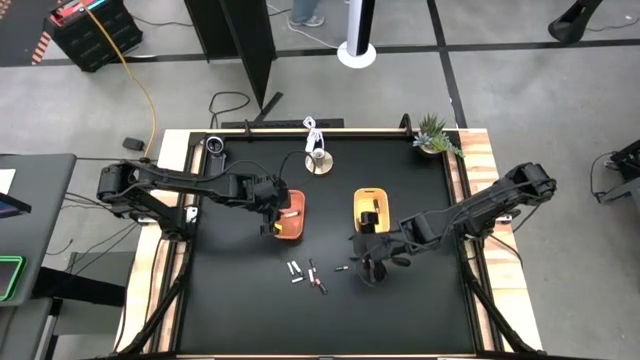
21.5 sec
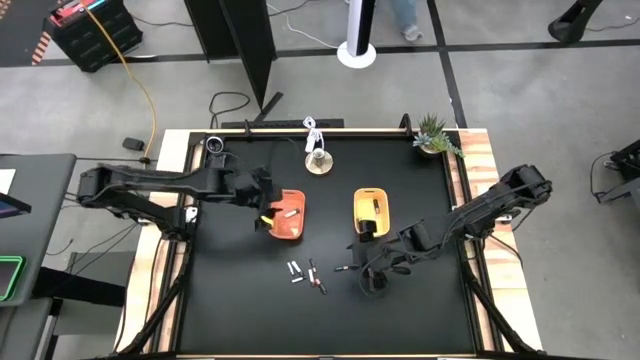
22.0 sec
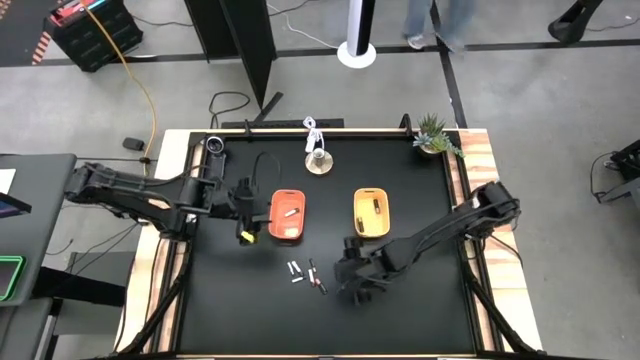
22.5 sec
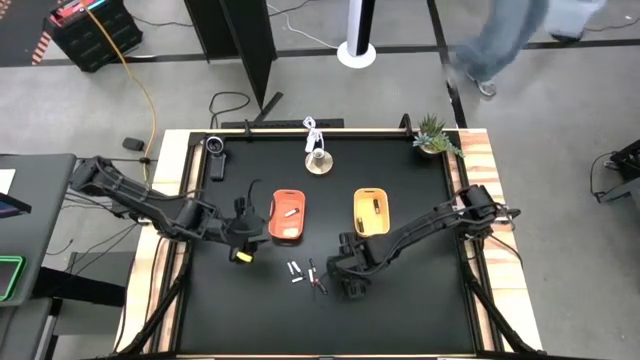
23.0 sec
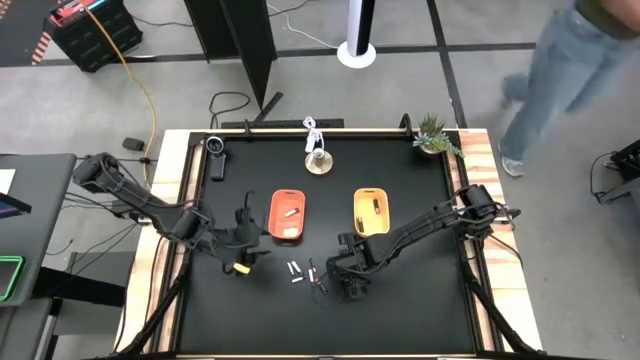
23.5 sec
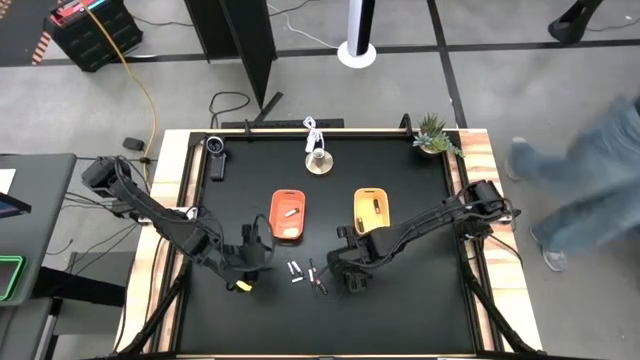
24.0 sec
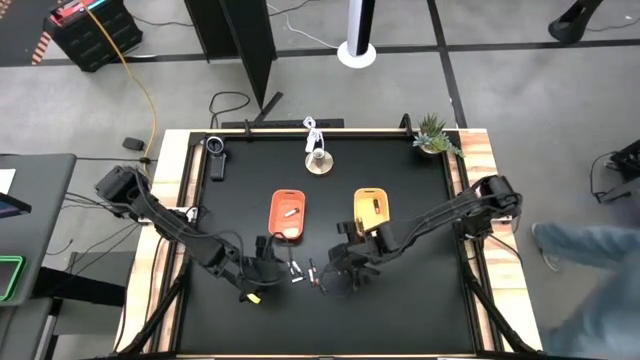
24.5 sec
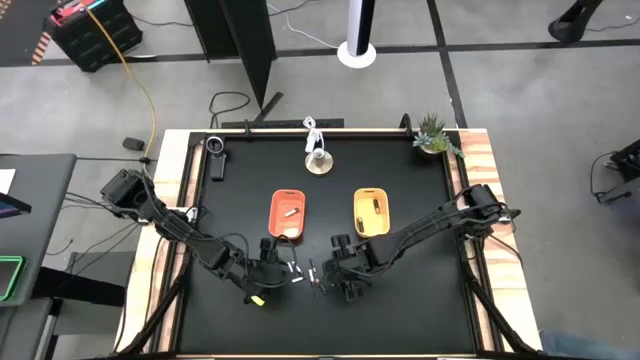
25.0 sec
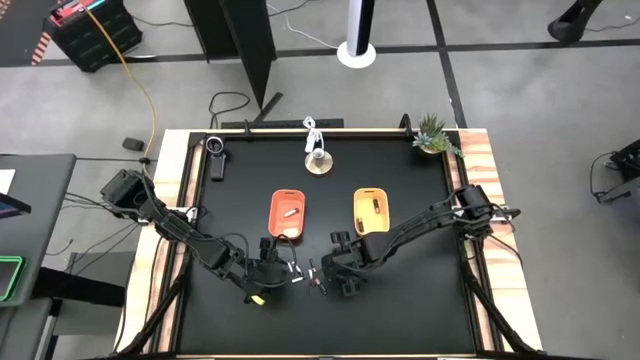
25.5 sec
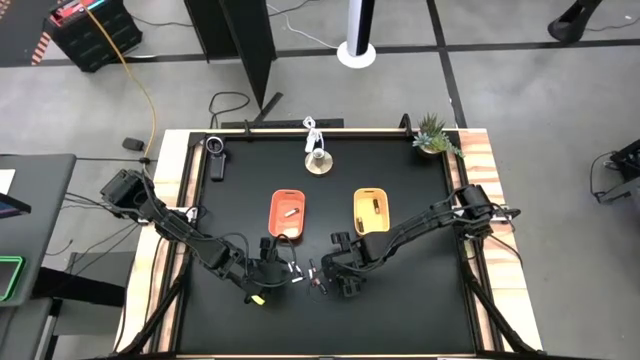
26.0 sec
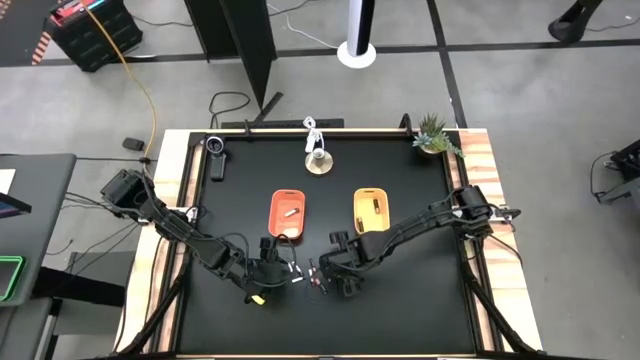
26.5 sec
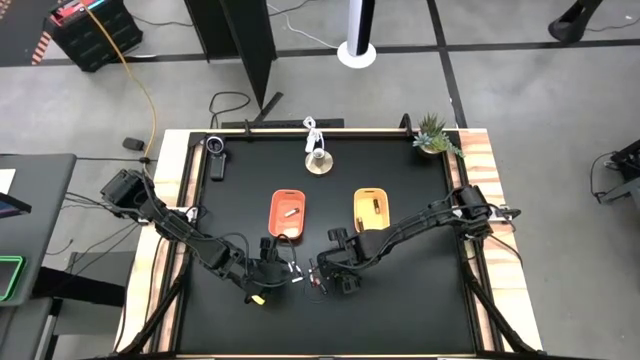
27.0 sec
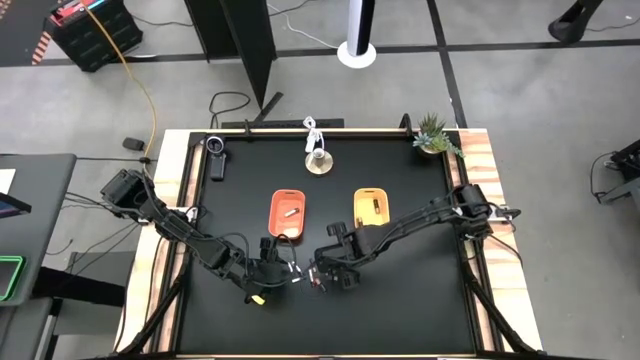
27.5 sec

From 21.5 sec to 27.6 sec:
Task: Sort batteries
Put the black battery into the yellow bin

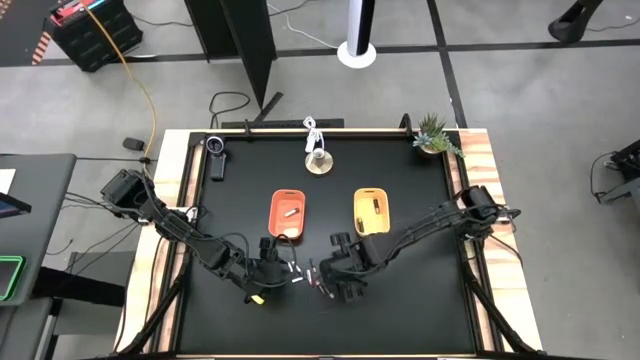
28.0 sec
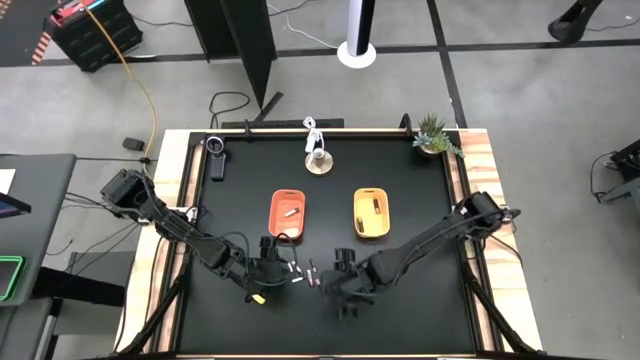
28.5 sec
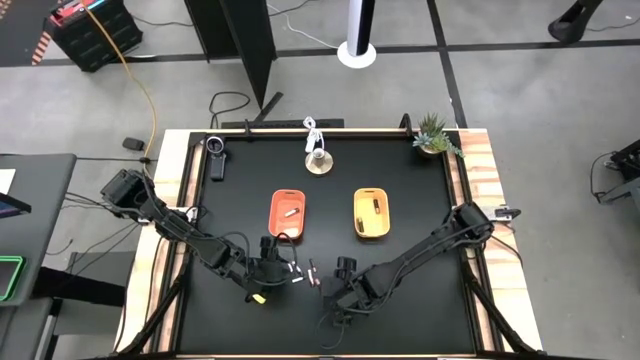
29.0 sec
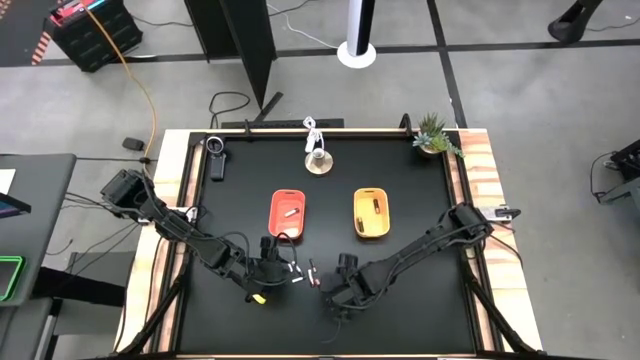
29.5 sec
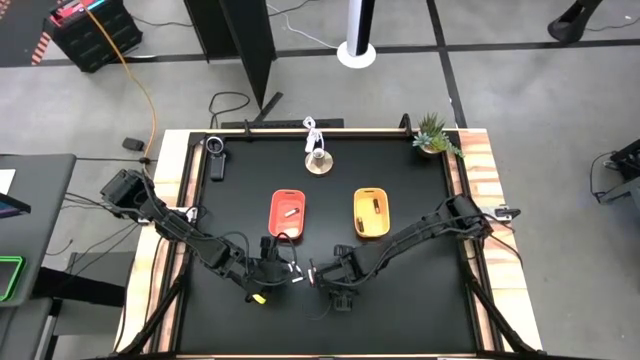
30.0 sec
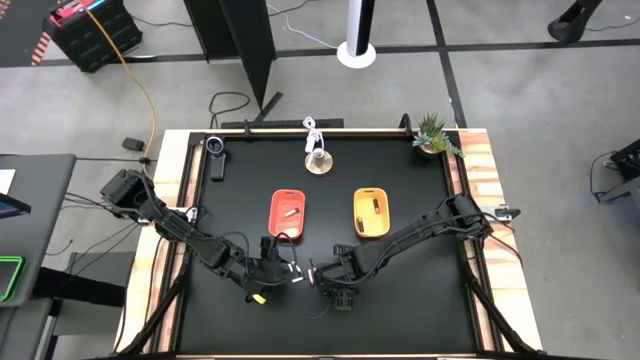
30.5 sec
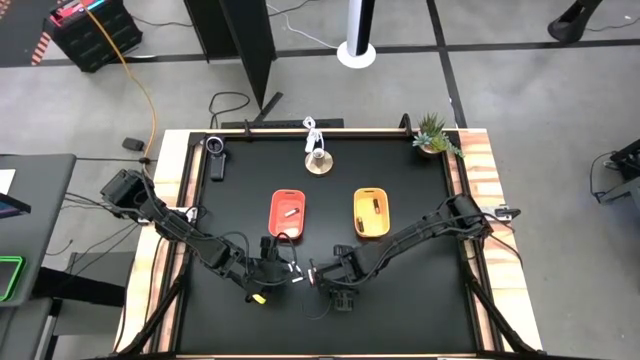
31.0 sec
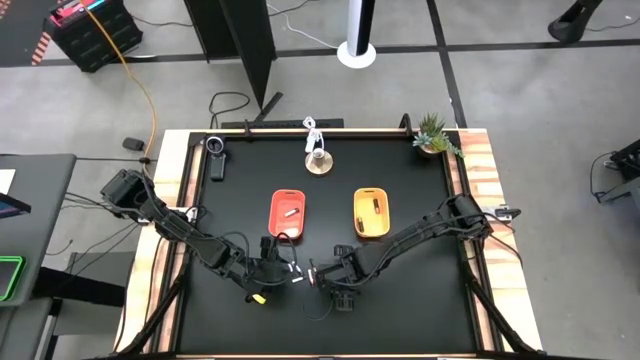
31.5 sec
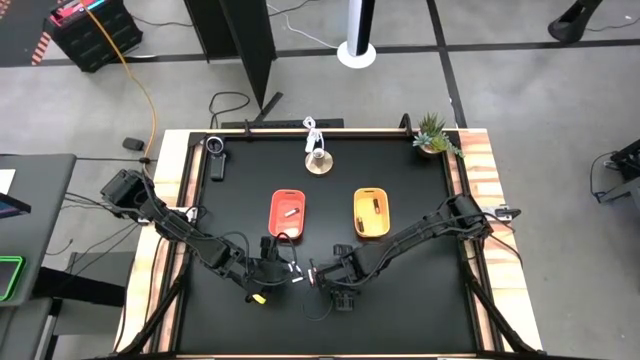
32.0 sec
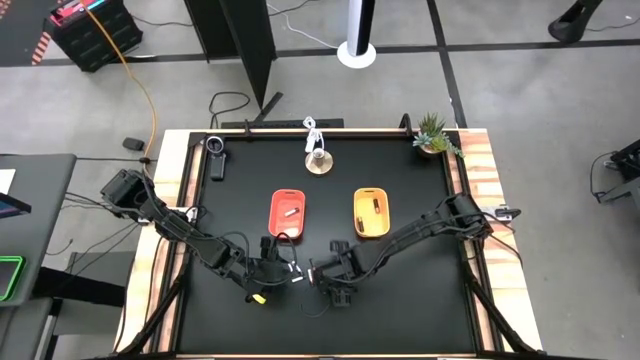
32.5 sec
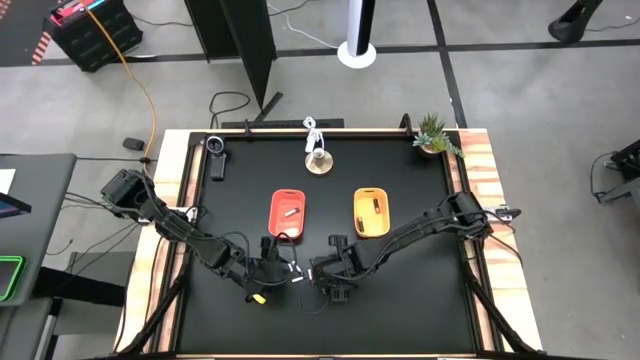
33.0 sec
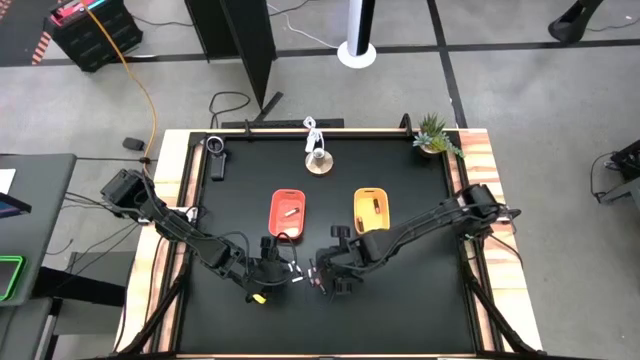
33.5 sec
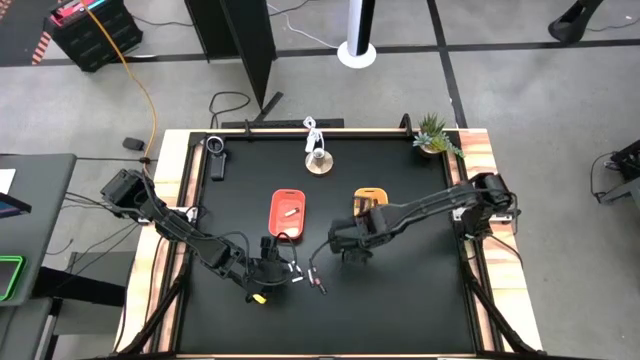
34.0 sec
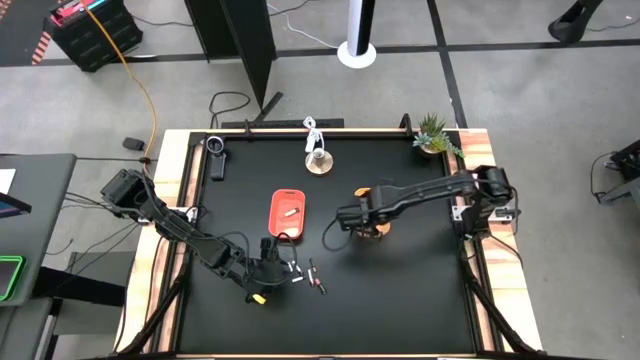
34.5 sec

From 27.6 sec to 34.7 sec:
Put the black battery into the yellow bin

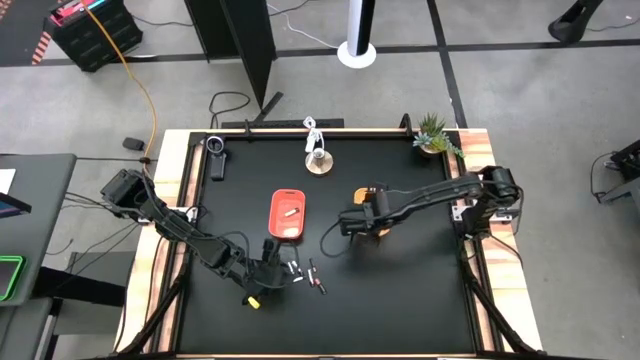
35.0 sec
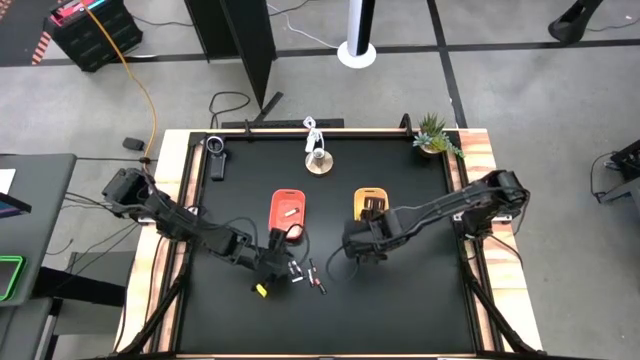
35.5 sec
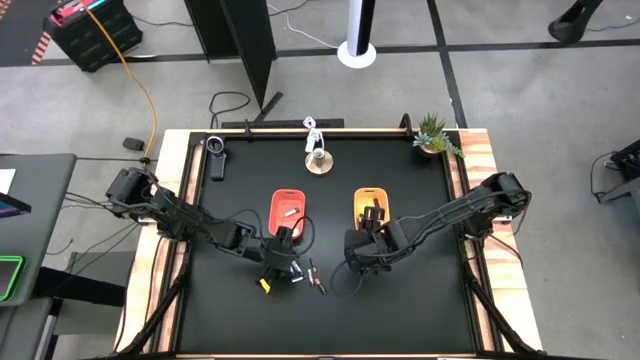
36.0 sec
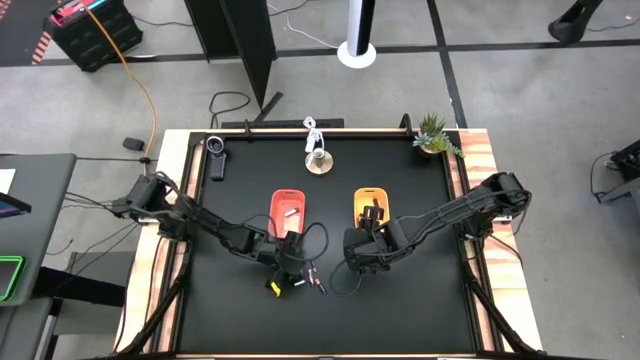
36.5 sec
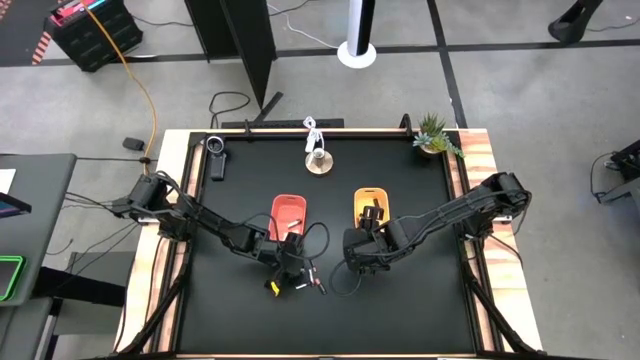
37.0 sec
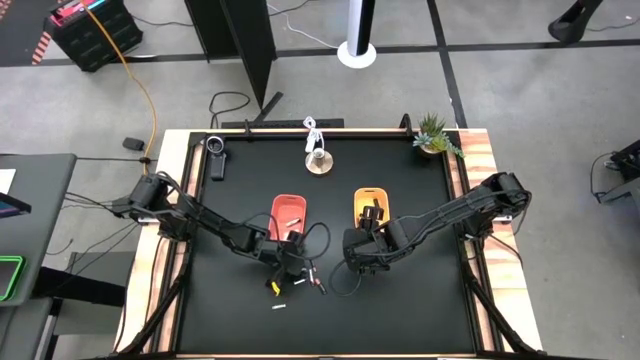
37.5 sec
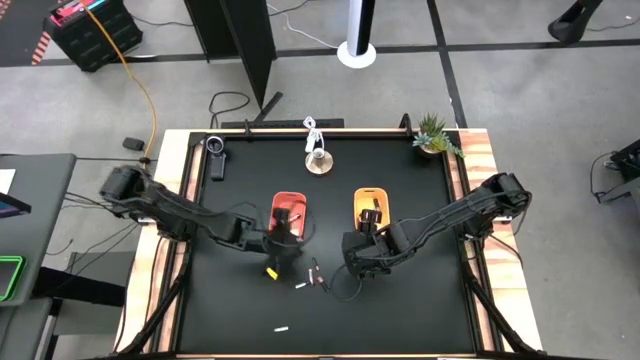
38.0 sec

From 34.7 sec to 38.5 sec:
Put the silver battery into the orange bin

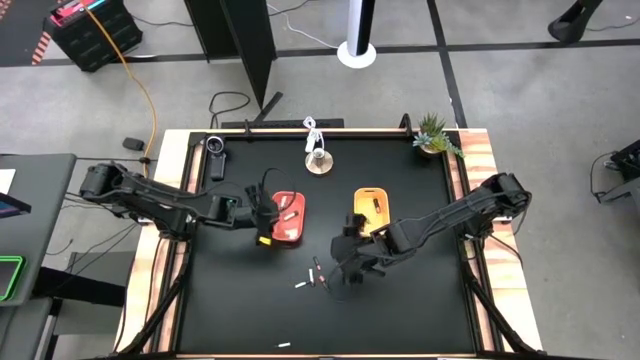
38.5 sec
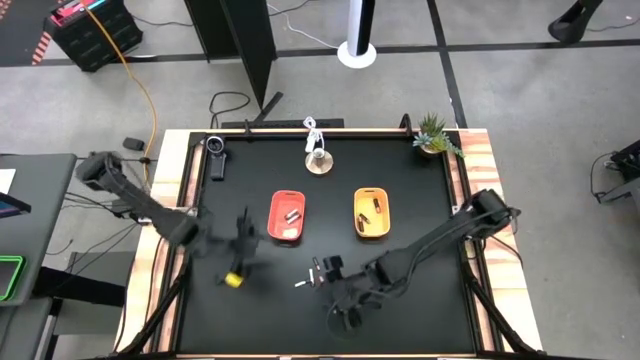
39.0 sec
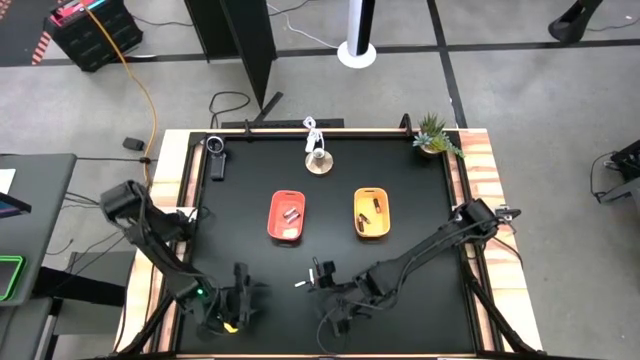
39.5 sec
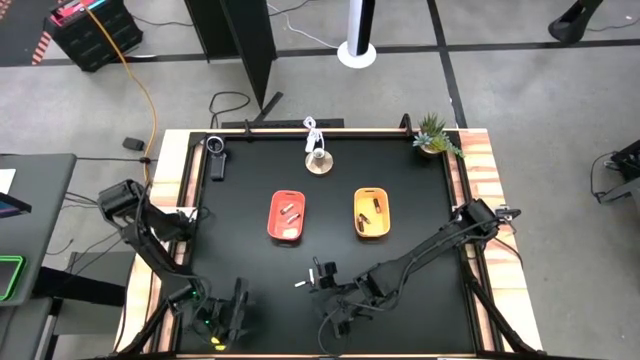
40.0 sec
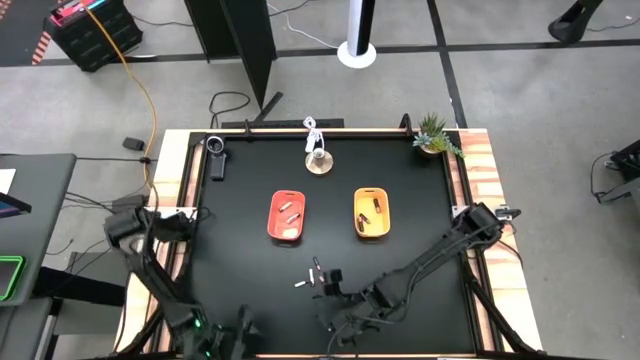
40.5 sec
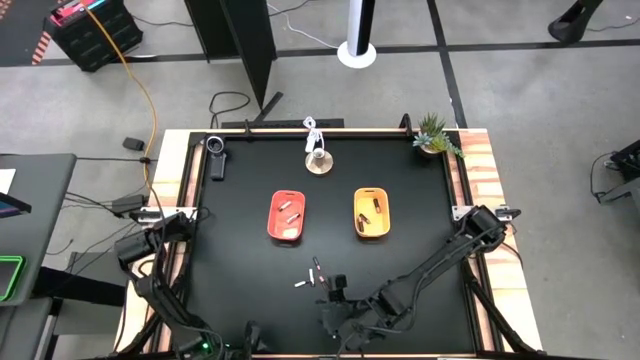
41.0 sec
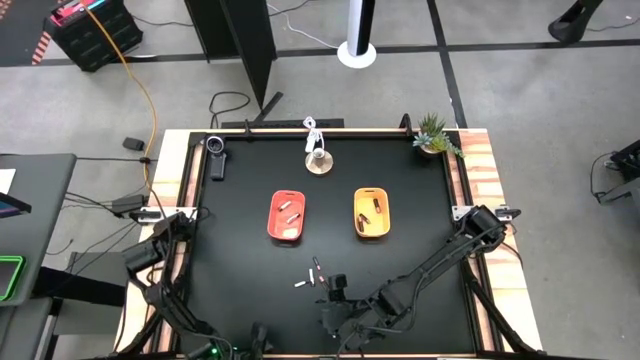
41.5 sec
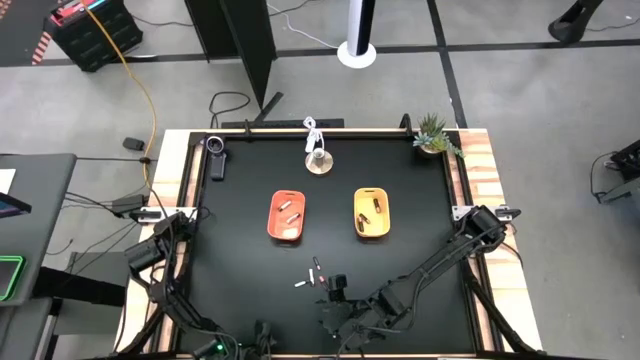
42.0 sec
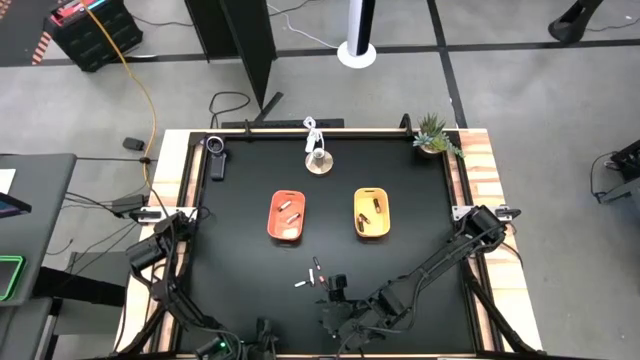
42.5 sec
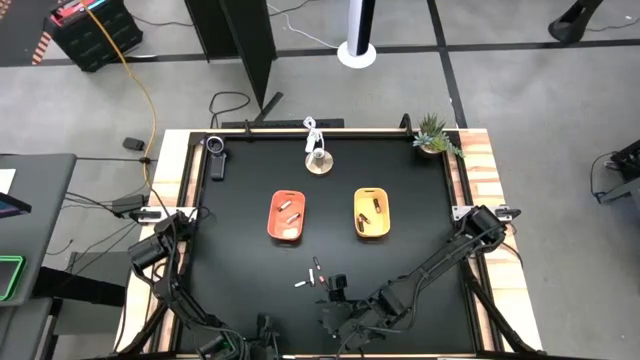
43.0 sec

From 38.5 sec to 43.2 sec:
Adjust the silver battery
